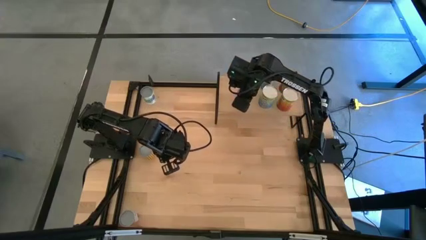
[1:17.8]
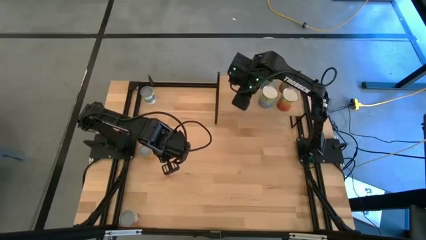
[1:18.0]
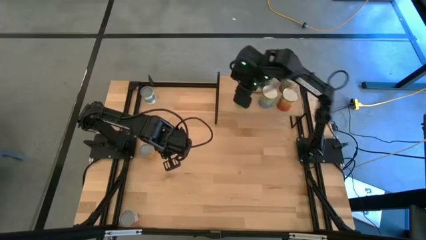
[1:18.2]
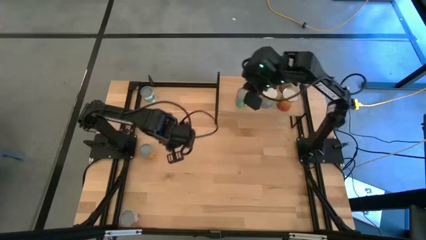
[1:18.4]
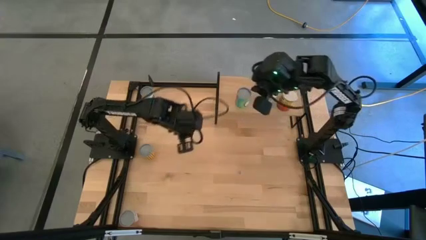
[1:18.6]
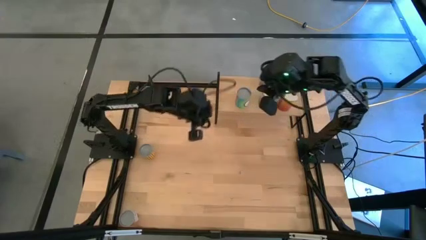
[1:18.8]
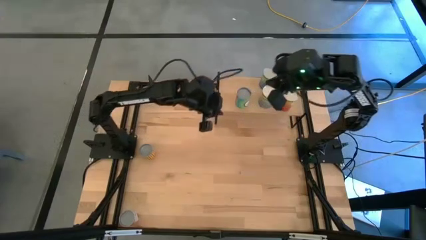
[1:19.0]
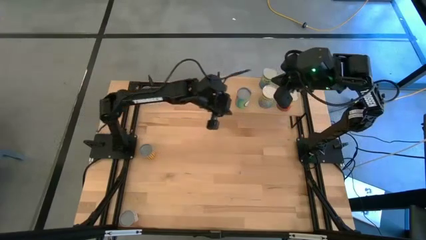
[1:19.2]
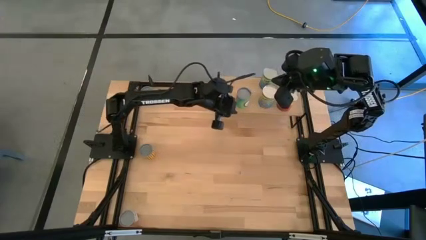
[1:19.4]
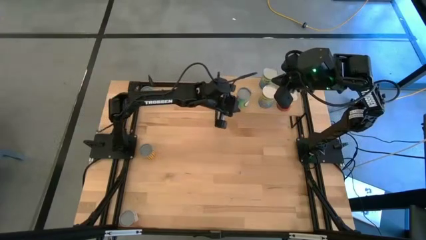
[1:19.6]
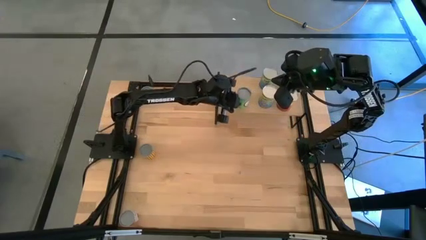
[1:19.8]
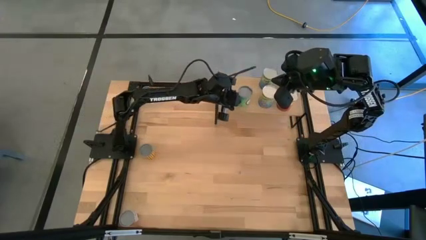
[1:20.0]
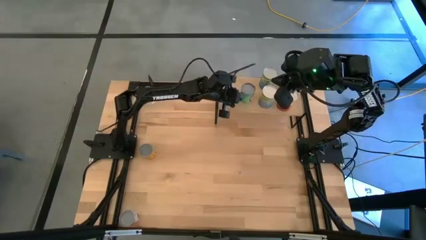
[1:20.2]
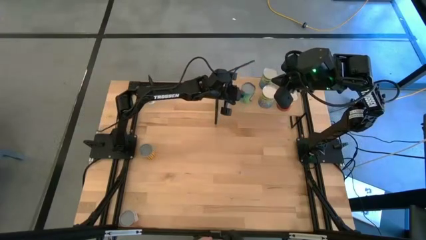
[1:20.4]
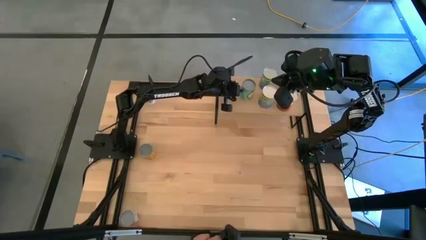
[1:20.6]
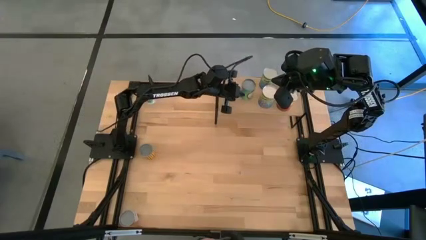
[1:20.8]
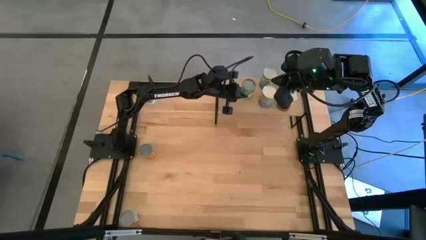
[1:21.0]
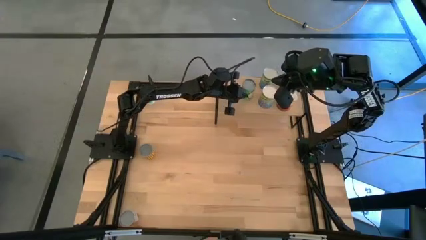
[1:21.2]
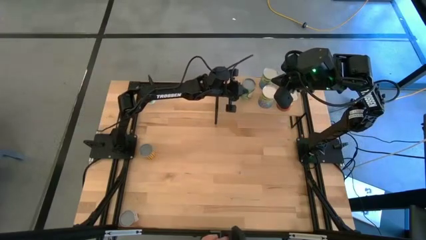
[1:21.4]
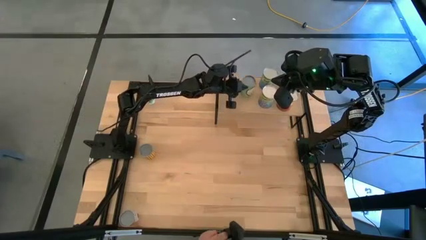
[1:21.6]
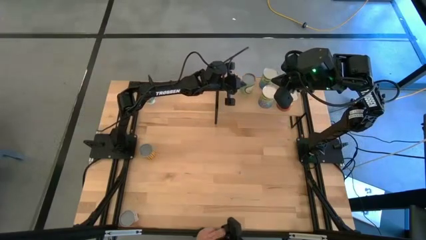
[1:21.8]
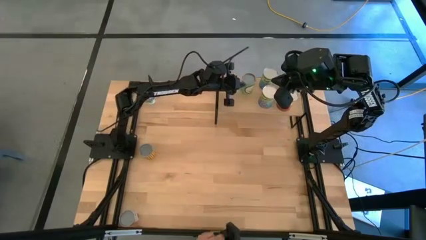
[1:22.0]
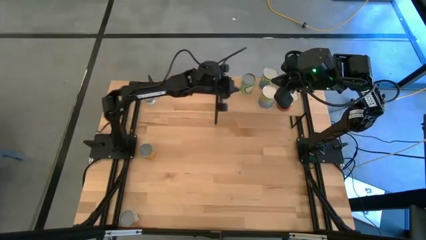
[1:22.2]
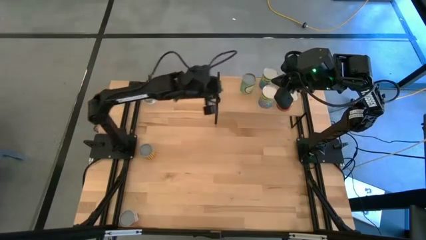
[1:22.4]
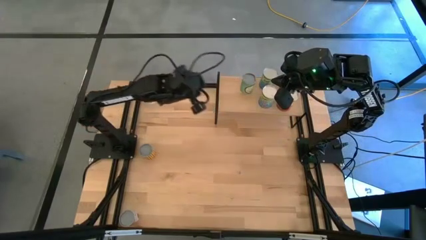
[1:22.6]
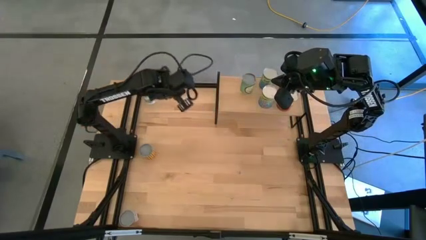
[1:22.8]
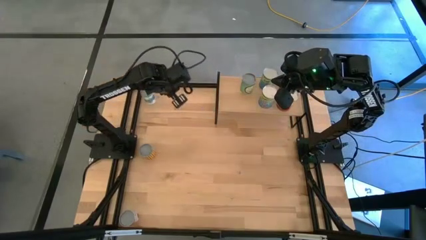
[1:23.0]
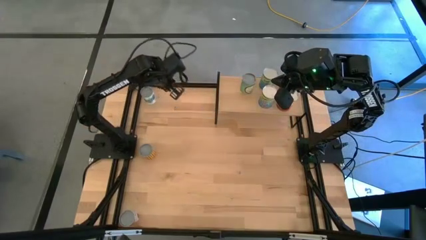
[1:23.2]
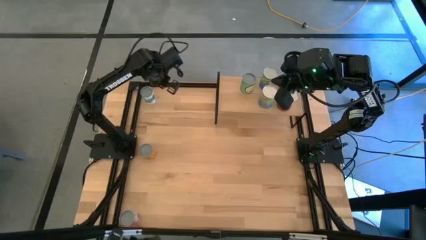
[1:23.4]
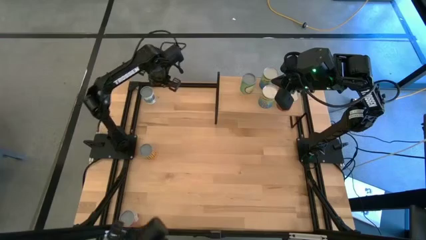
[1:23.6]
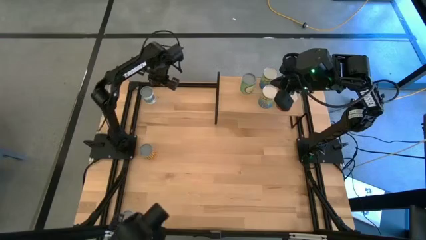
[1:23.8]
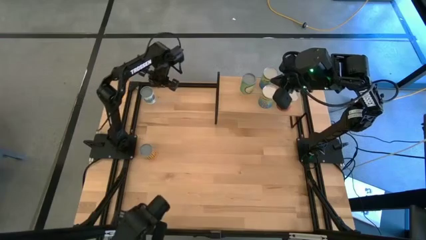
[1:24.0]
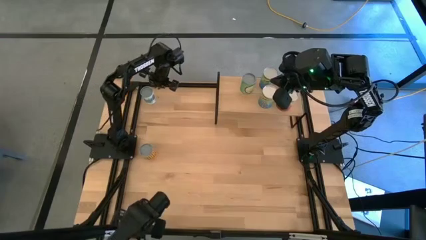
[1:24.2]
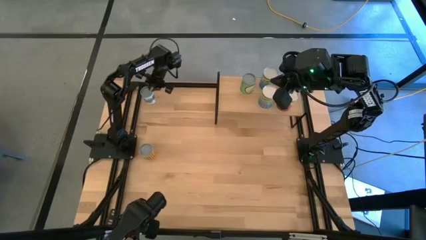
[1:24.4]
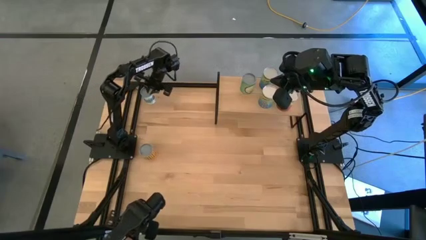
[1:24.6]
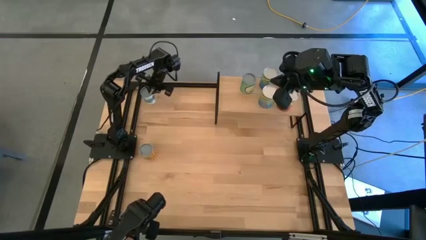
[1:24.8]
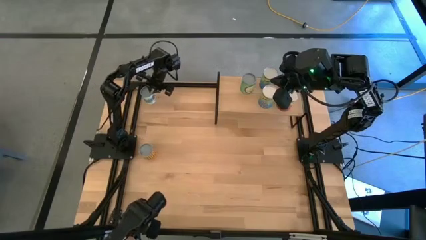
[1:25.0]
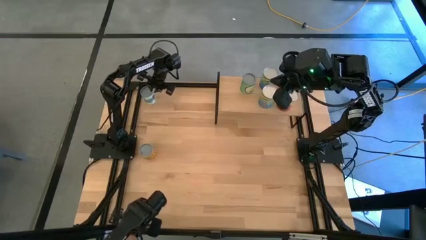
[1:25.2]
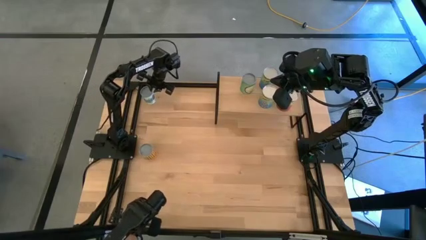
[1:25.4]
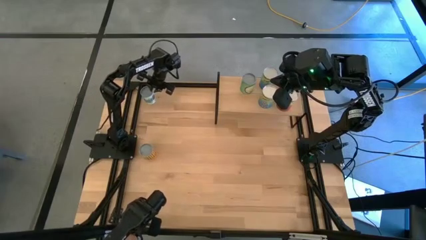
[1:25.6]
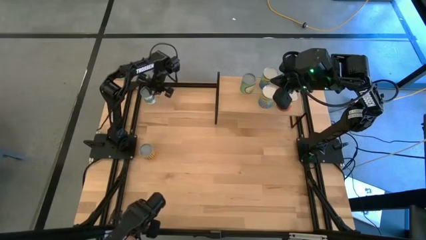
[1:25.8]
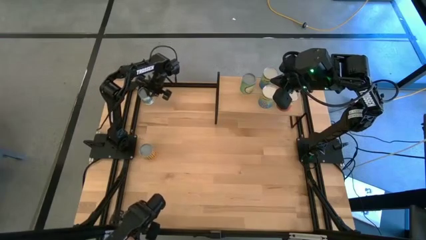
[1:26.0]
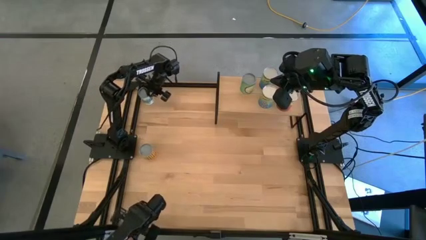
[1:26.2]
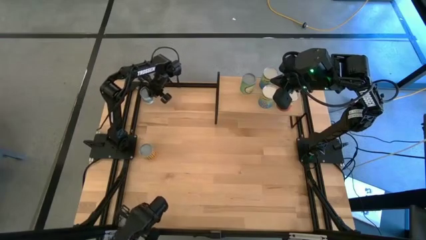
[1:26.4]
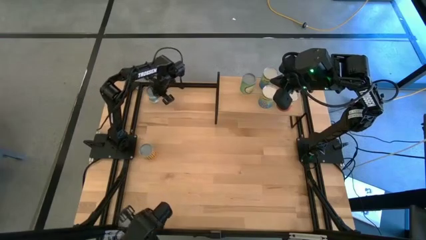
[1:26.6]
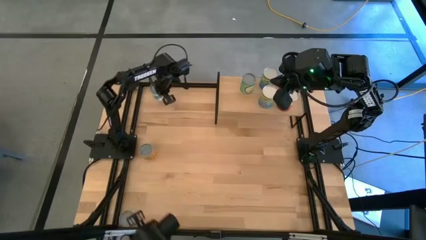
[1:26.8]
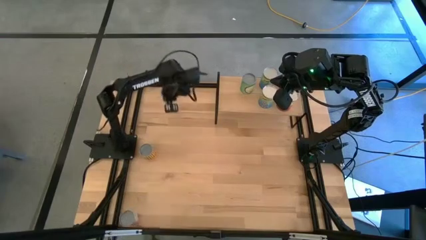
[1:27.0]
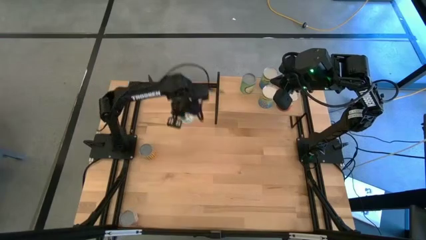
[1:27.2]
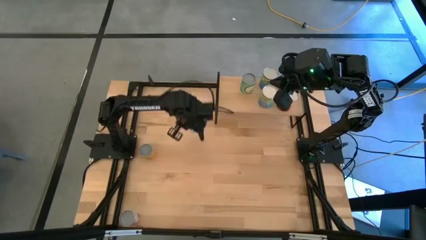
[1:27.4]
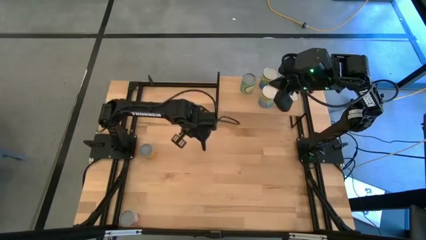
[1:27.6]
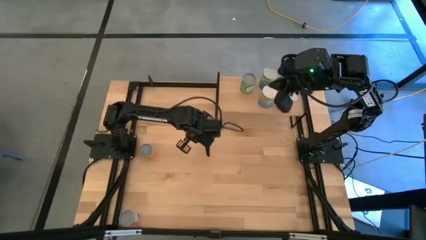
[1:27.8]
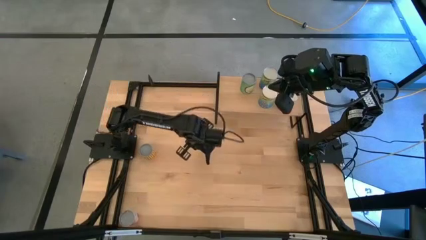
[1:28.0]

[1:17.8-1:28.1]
Task: Pick and place cans onto a shelf
Put the white canned good on the shelf
